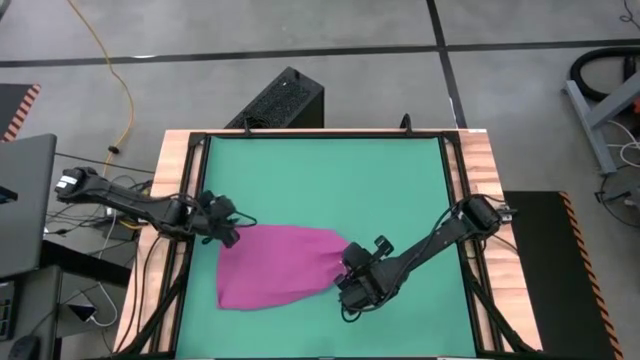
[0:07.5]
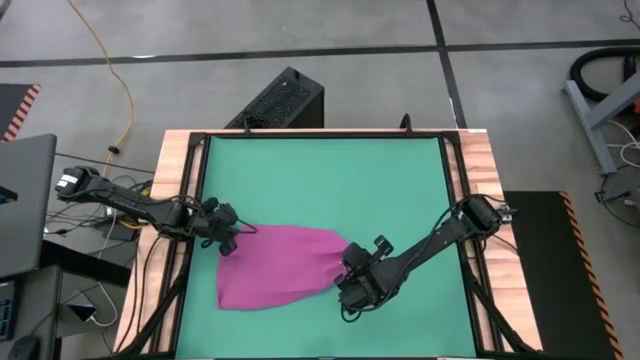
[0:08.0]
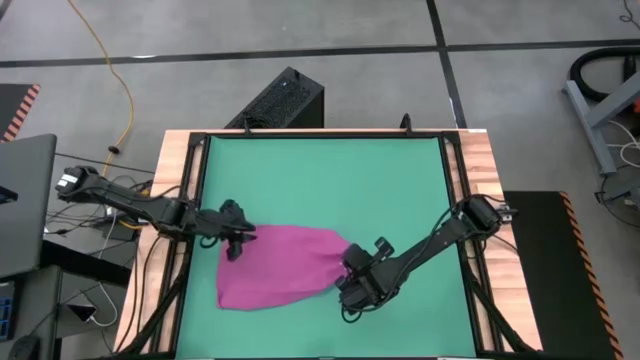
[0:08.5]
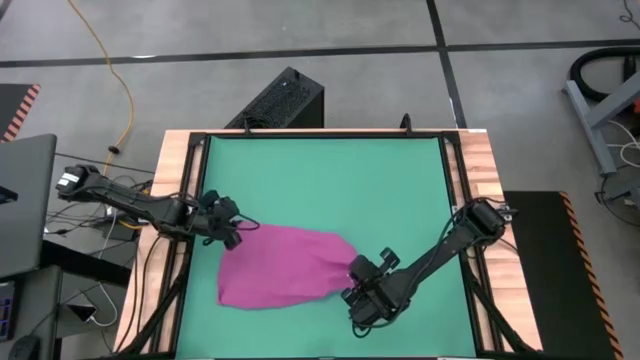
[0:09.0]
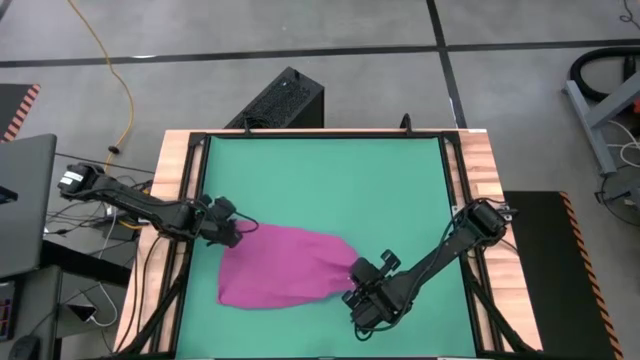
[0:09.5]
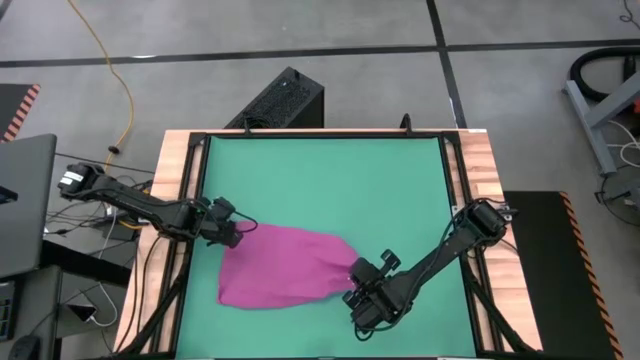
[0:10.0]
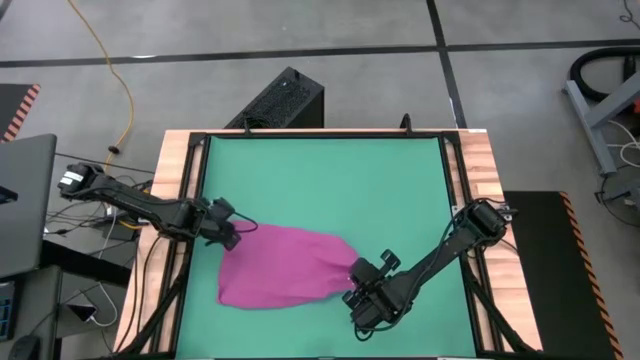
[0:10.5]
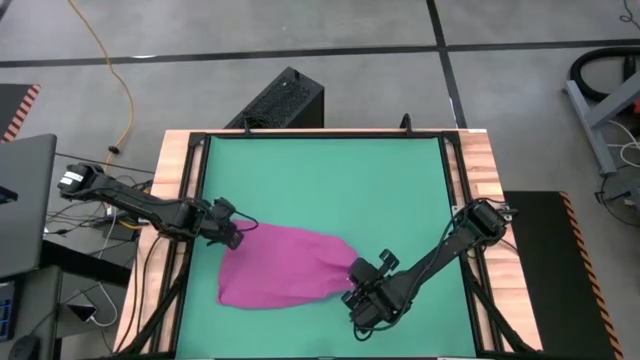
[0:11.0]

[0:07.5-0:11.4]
Task: Roll towel into tight, uniform cylinder
Roll the pink towel

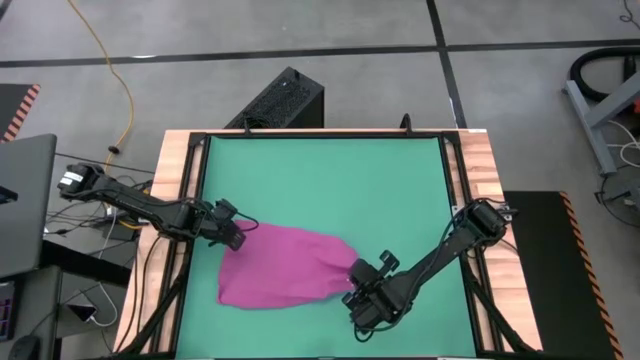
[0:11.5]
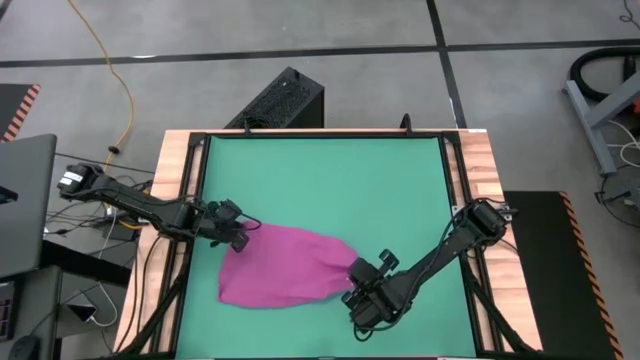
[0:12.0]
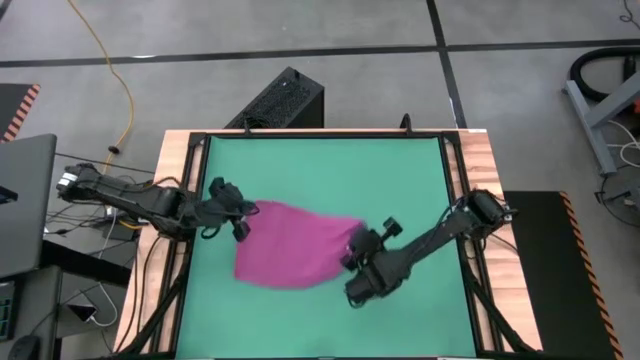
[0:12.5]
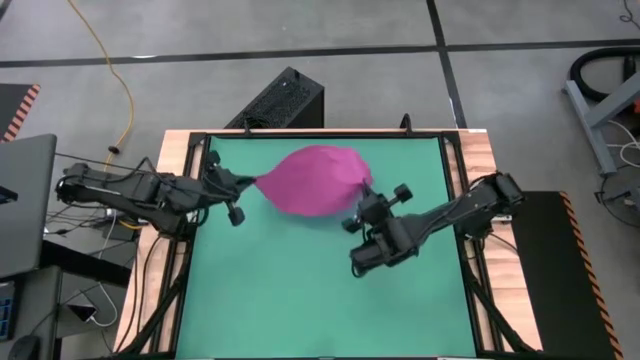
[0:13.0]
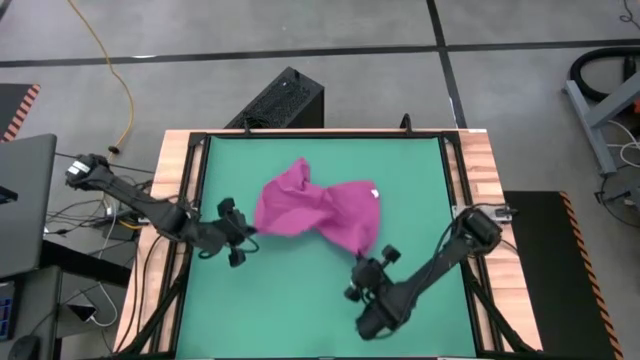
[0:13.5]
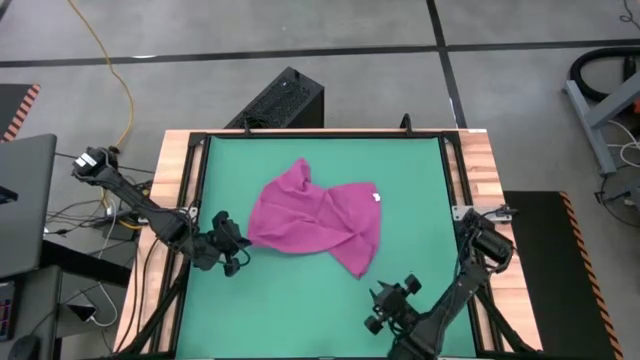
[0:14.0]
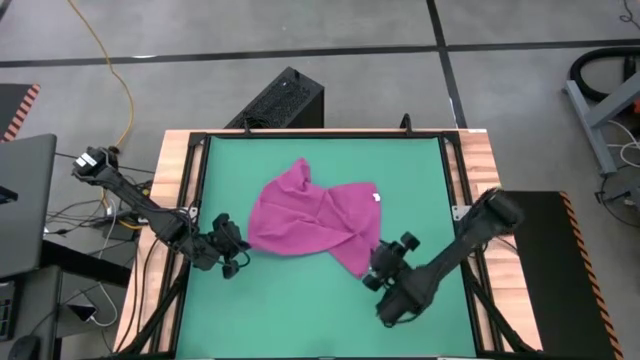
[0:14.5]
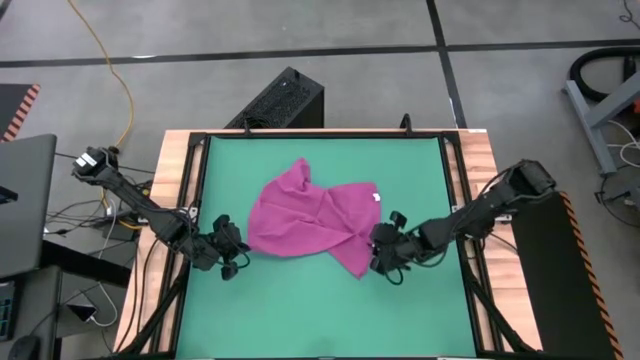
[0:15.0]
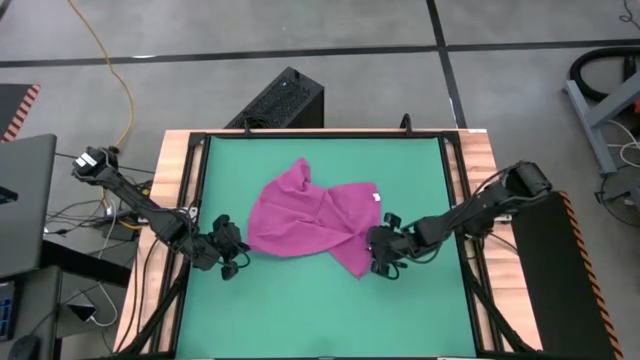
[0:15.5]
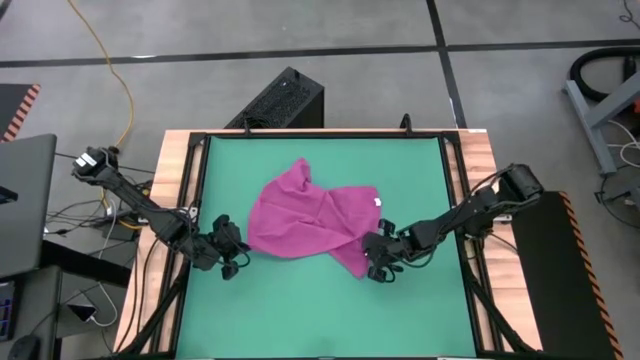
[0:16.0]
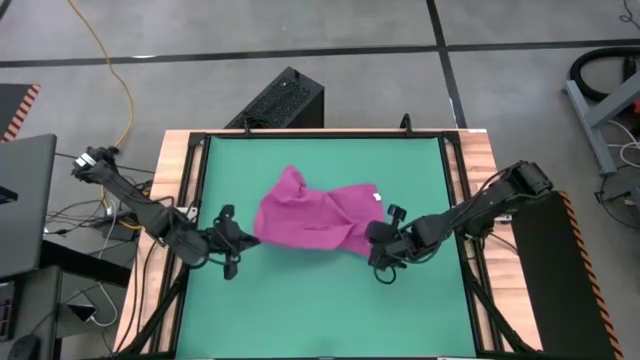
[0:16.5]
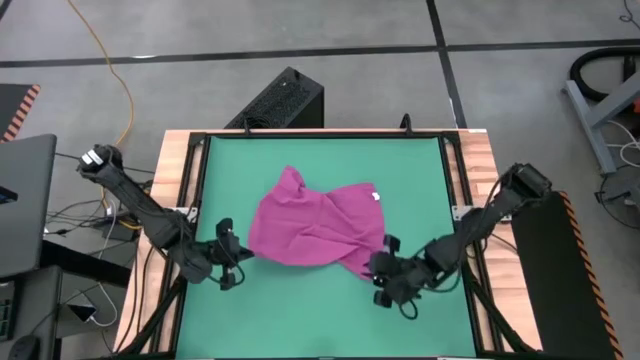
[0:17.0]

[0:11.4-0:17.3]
Roll the pink towel

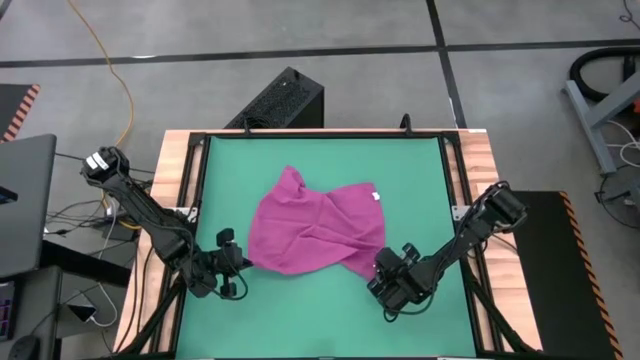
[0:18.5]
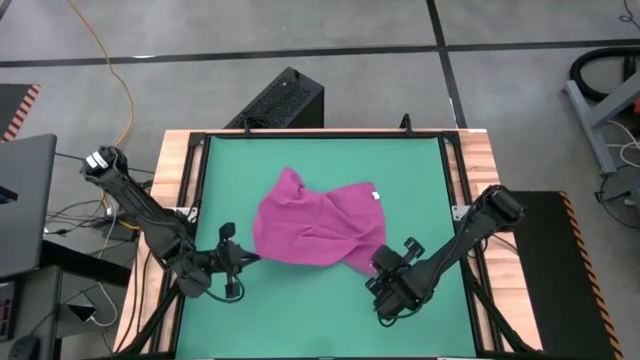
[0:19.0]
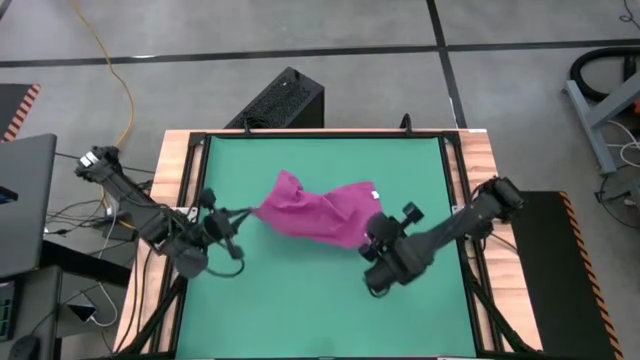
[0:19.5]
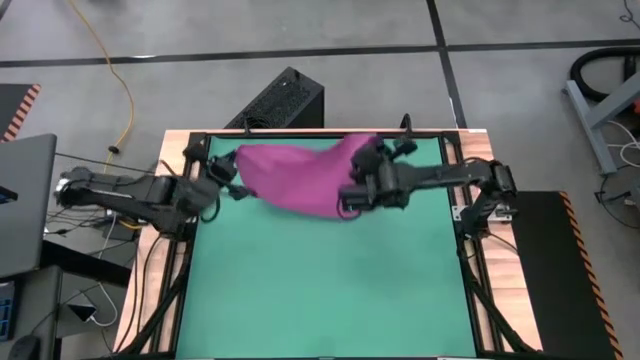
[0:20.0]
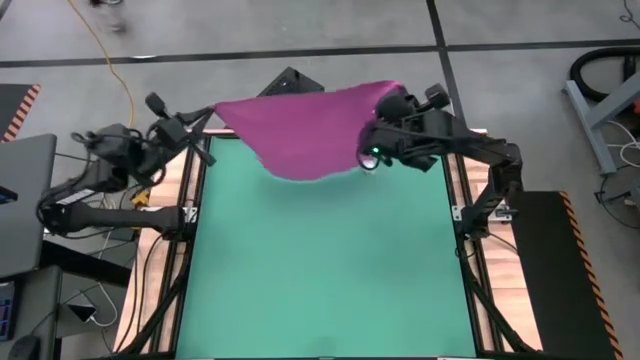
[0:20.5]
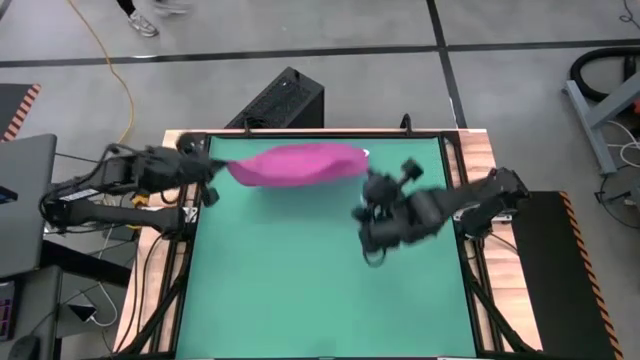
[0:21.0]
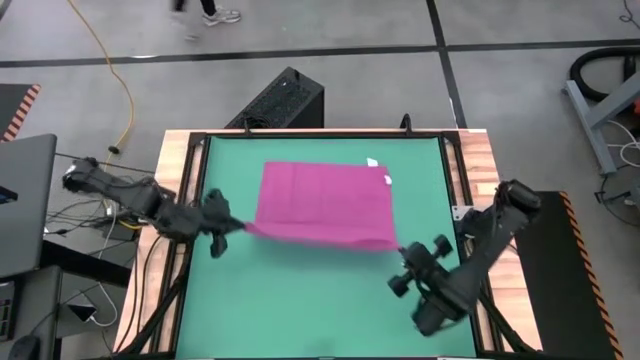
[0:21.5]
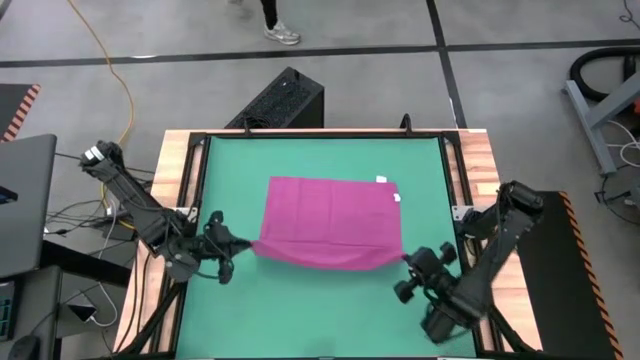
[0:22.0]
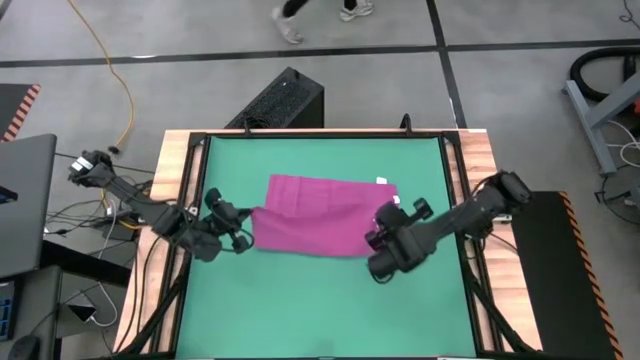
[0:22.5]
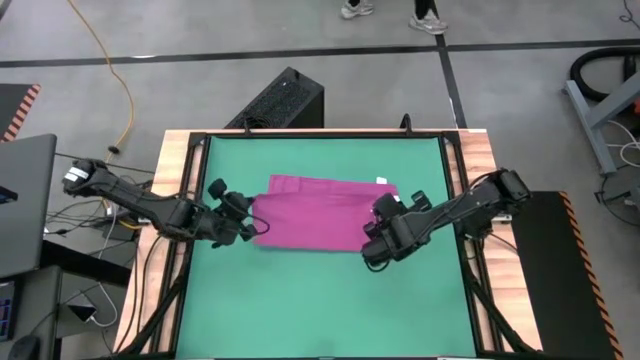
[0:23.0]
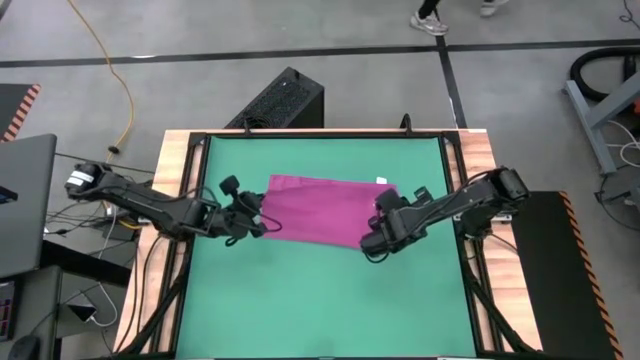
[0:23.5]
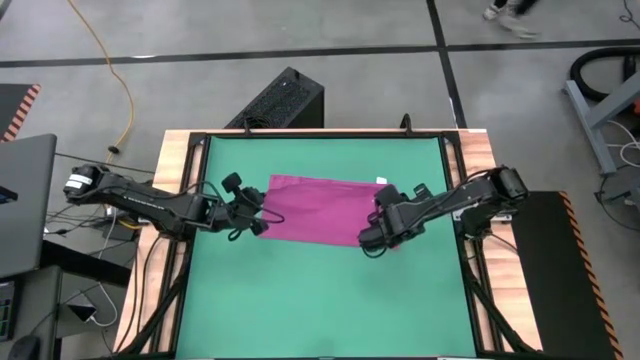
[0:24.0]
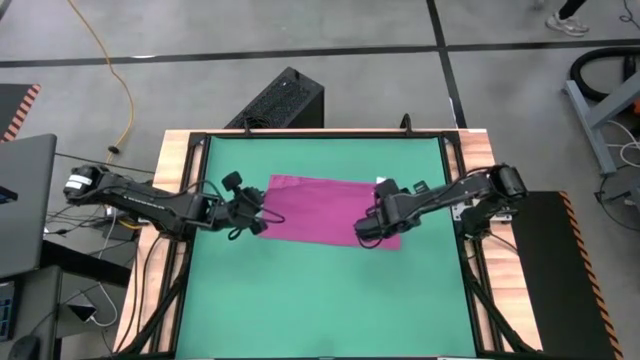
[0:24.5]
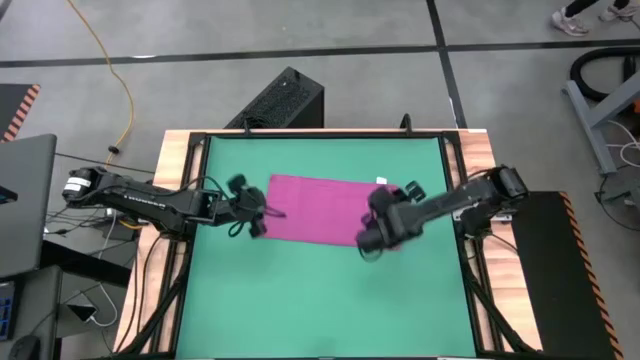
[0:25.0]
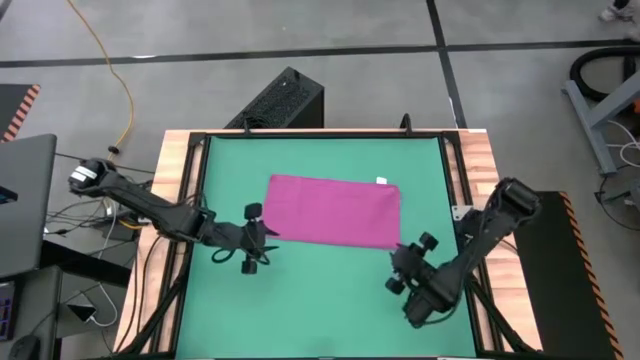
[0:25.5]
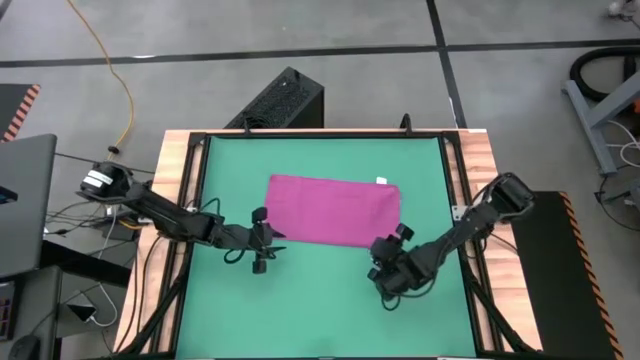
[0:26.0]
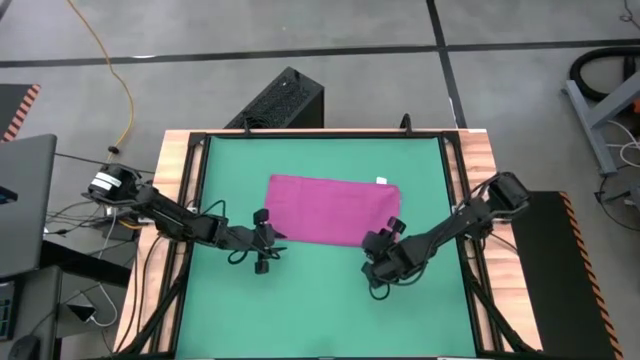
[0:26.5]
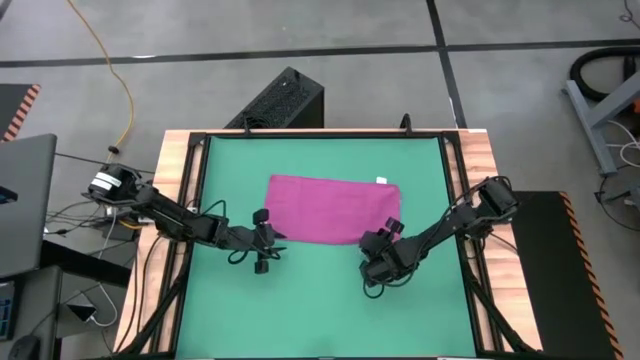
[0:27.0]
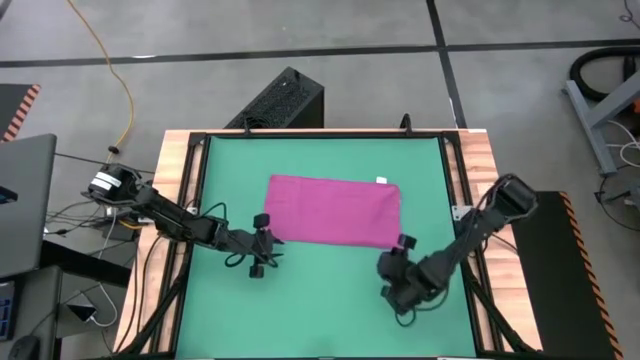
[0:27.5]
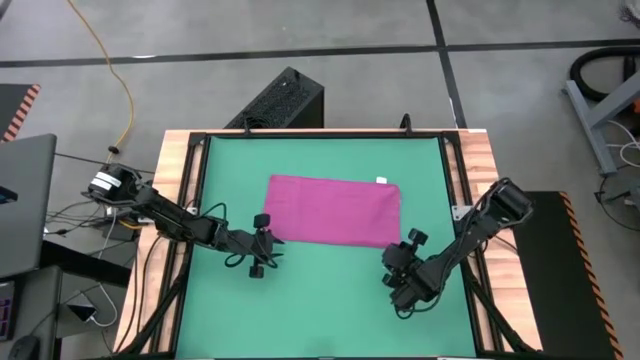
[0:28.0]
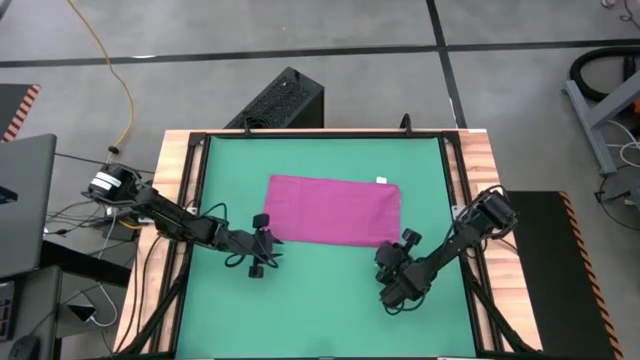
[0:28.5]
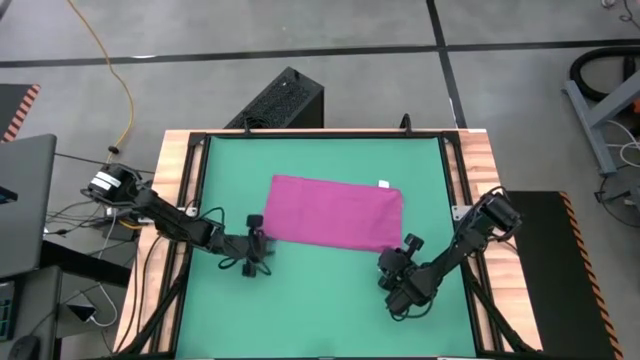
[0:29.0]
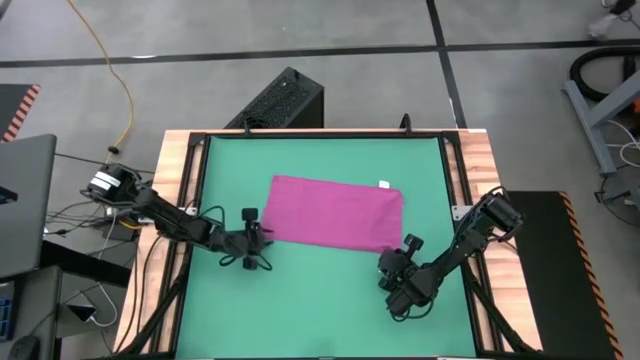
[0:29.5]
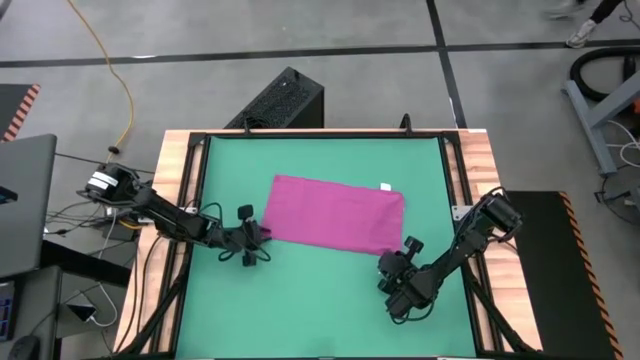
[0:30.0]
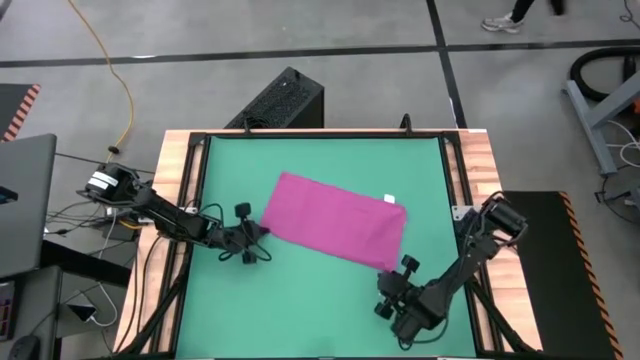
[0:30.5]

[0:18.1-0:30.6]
Roll the pink towel
